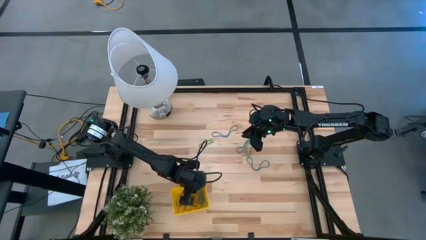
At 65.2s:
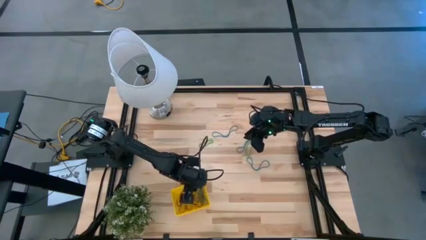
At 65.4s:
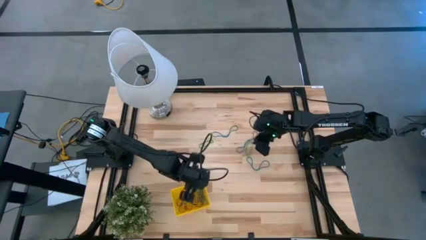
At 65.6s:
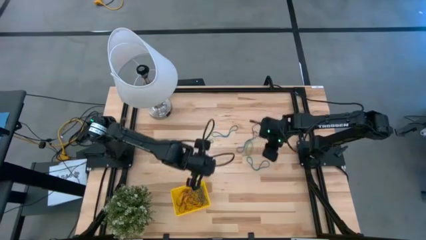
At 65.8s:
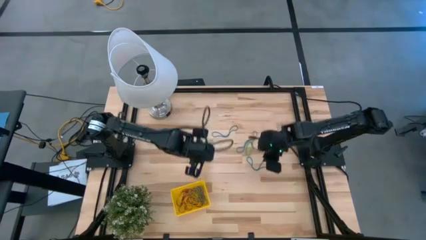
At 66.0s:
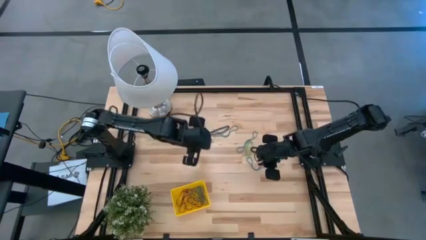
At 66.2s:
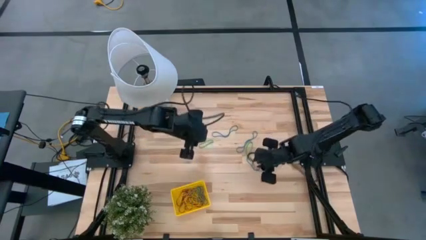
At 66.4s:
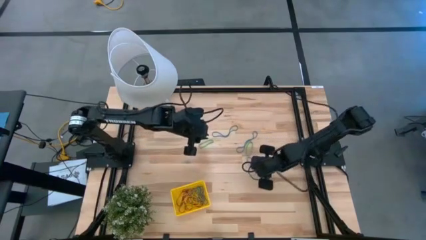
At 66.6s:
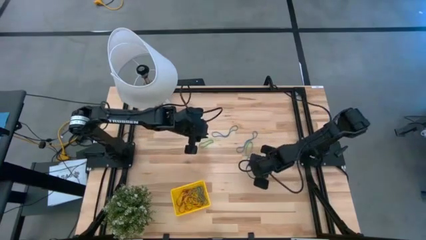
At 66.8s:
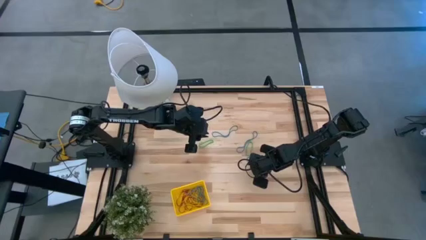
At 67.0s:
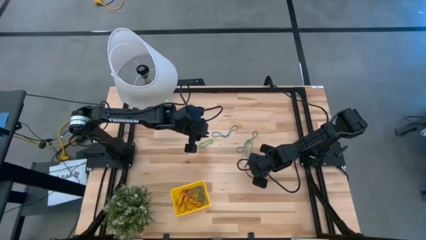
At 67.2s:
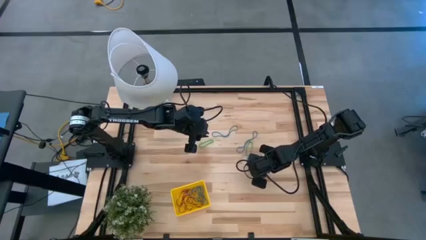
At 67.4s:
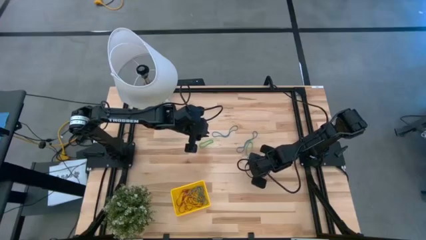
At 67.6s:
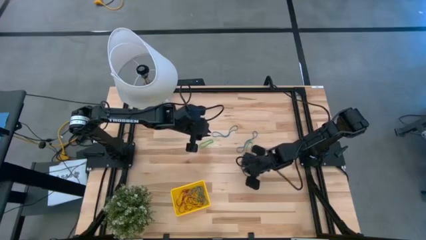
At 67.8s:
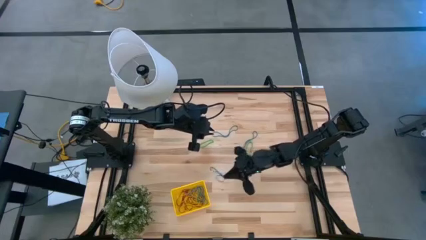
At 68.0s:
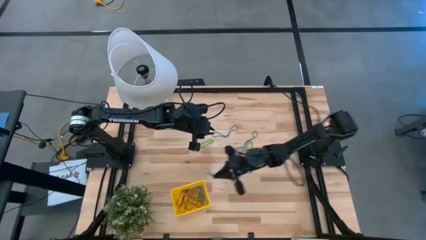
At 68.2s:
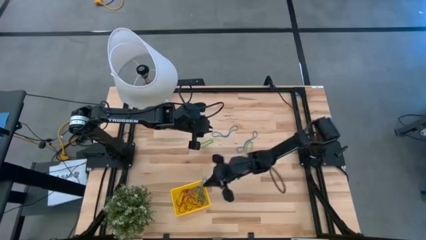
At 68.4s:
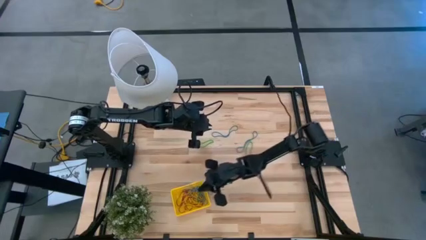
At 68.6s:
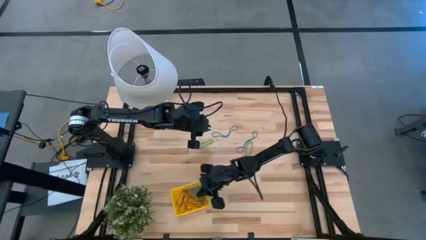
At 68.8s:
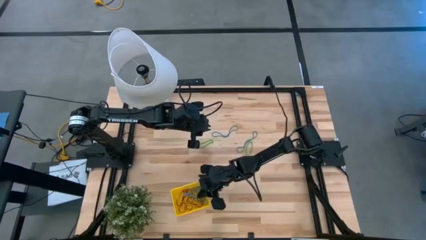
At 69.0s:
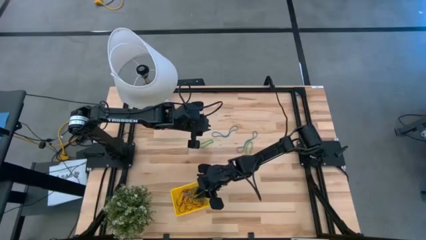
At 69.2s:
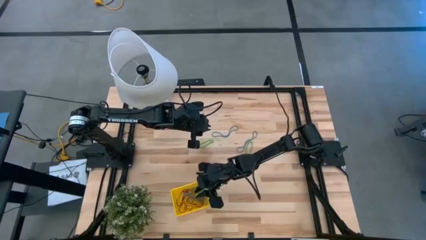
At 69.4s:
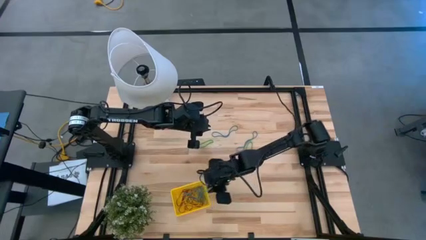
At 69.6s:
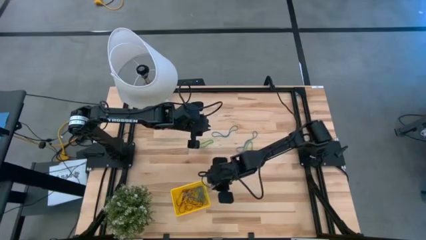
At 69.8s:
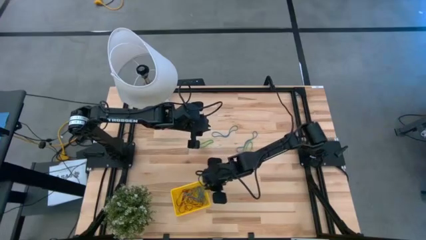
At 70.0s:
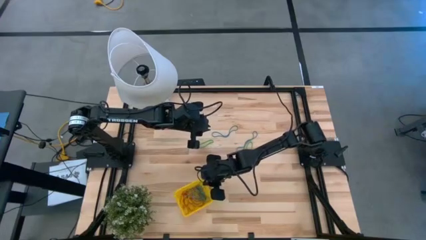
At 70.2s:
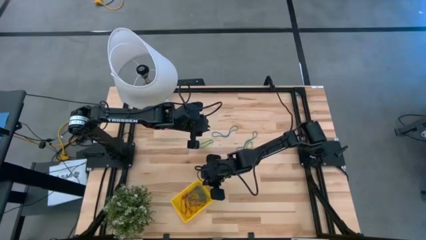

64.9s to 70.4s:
Task: Pick and place items into bin
Put the blue rubber band into the yellow bin

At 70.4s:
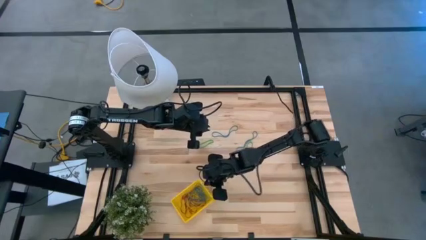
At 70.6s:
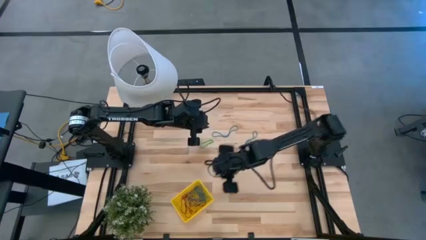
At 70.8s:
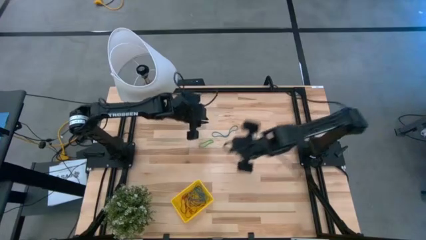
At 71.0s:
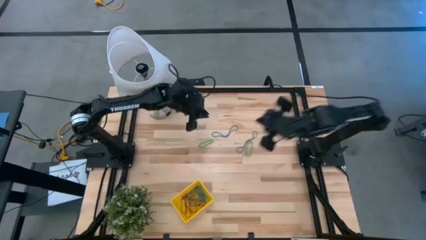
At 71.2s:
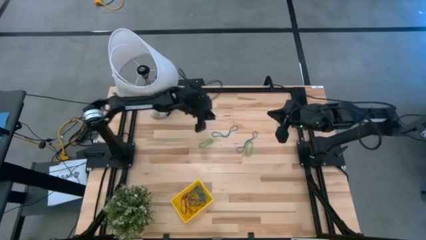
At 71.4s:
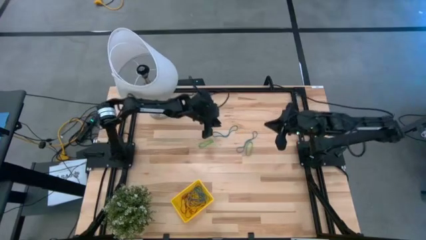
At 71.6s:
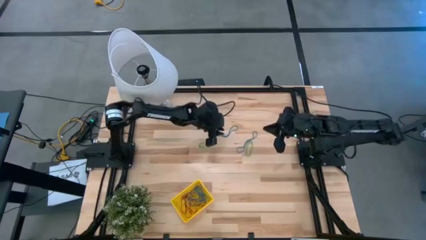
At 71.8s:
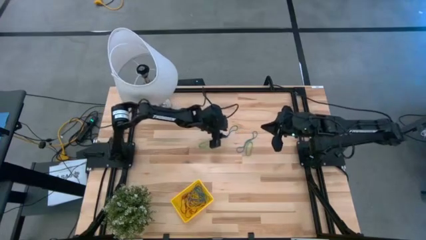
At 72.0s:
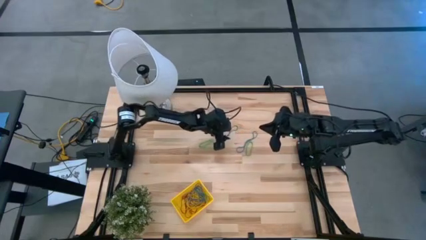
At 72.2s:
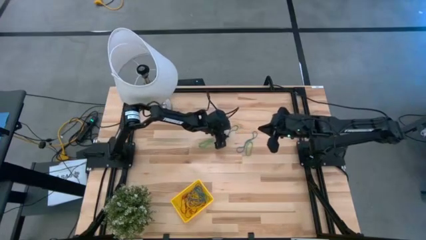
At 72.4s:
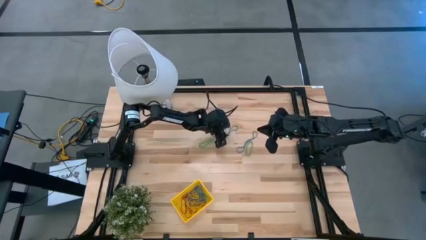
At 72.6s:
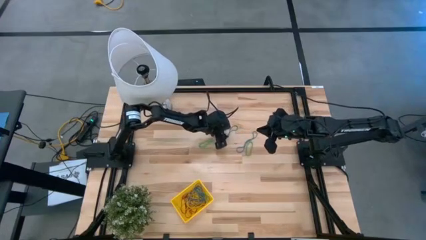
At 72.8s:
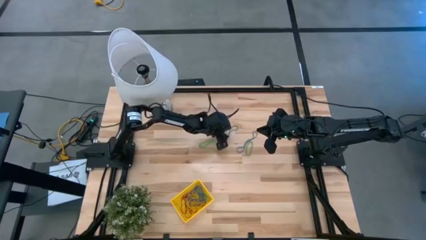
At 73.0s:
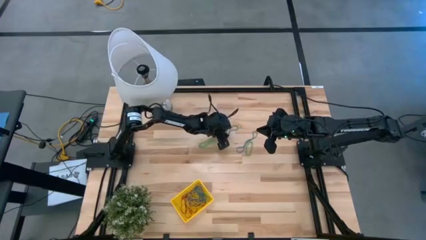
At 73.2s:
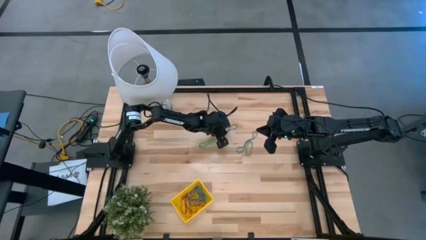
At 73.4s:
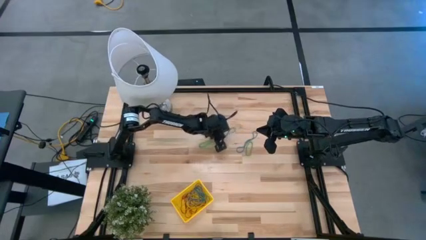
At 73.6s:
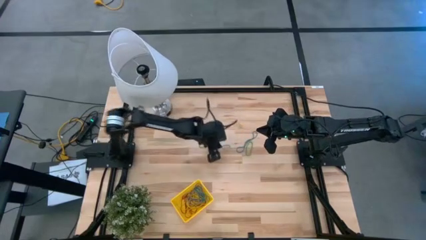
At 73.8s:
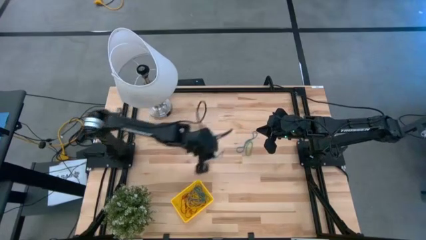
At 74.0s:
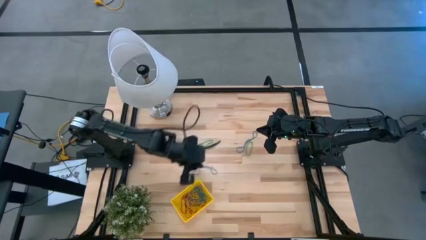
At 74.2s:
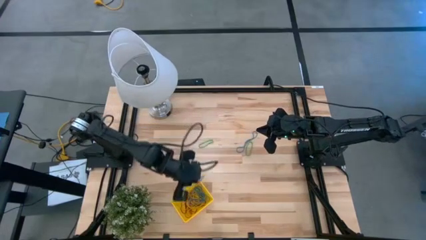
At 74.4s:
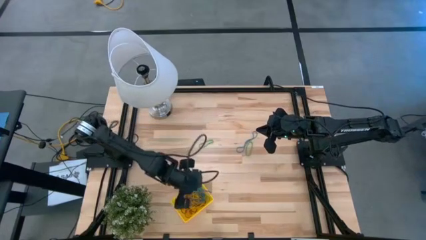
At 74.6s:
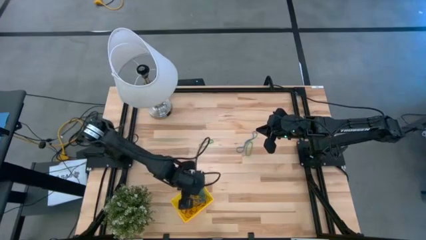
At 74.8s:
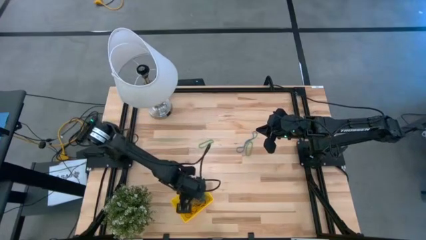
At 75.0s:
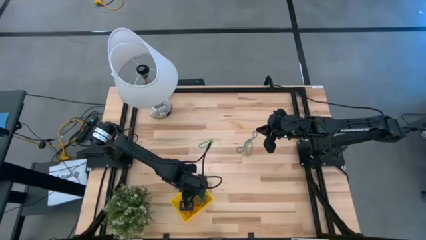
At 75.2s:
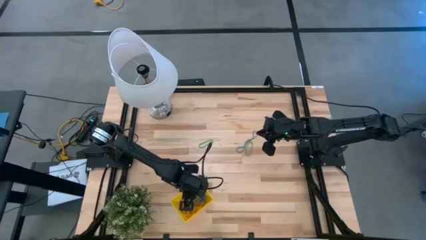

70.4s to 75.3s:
Put the blue rubber band into the yellow bin

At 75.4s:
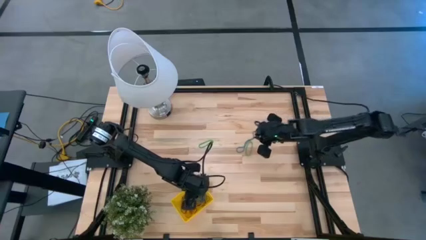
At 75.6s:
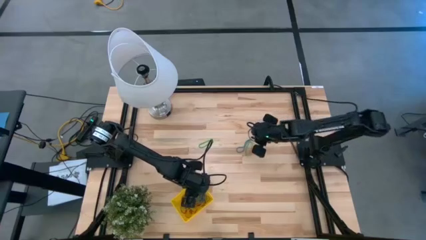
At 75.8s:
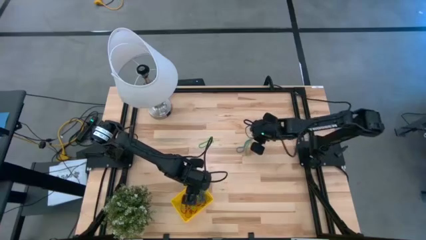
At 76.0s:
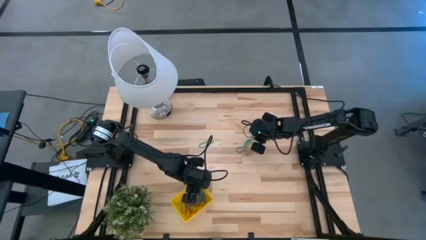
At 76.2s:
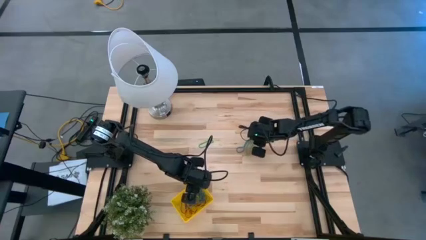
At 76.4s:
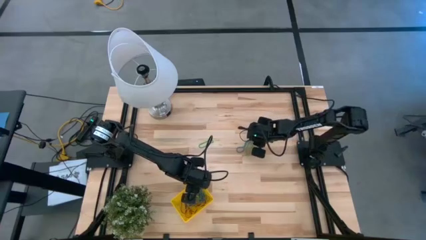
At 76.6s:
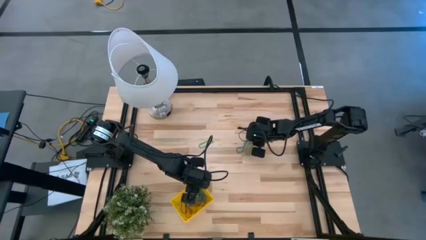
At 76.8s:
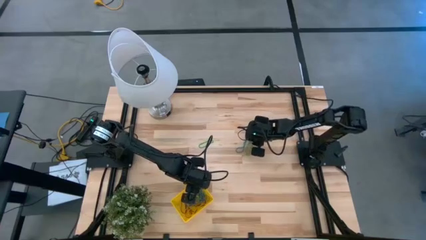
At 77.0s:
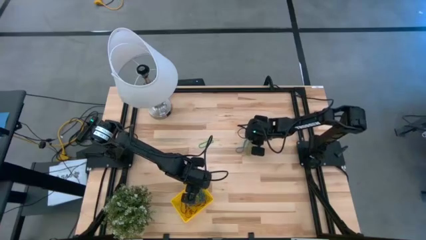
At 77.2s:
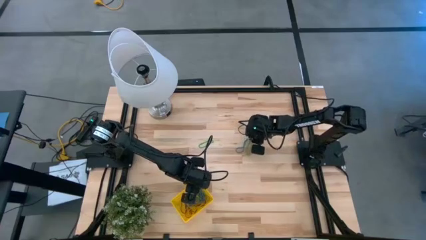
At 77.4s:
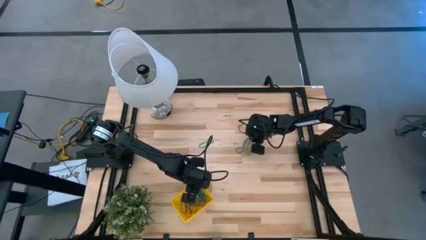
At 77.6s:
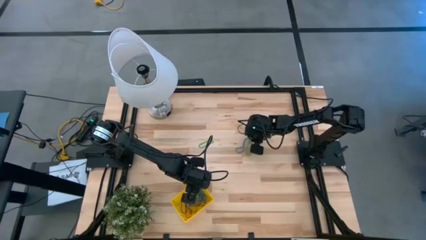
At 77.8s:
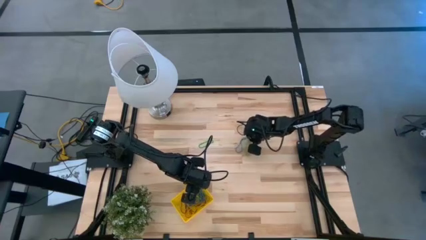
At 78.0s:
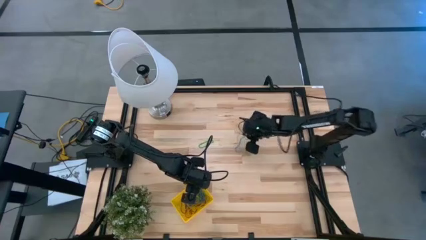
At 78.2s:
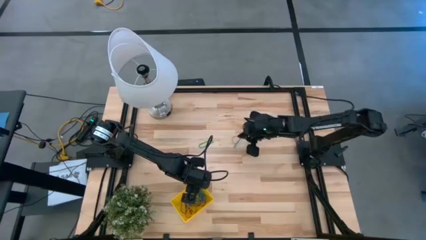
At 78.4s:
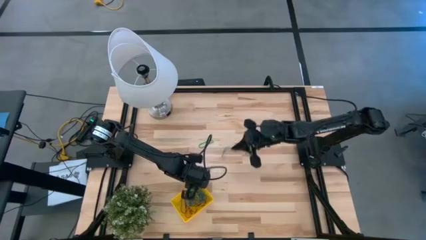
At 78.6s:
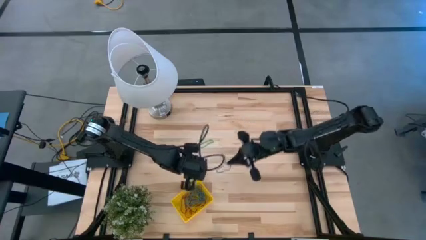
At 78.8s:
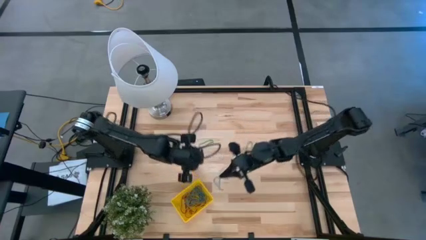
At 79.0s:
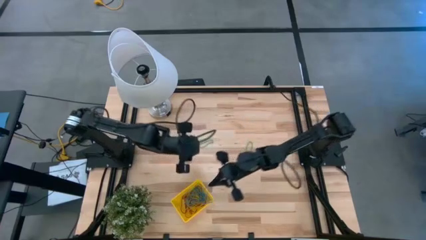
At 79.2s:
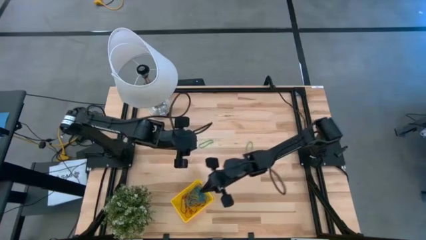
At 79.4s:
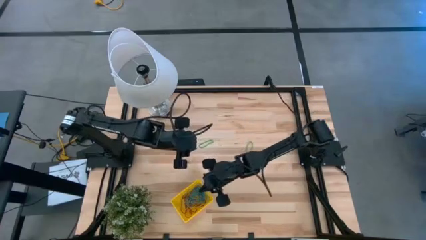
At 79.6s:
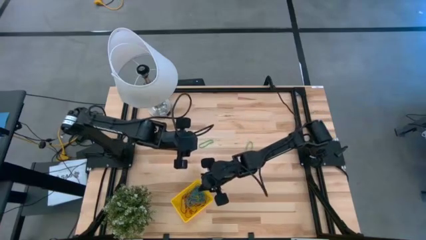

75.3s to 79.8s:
Put the blue rubber band into the yellow bin

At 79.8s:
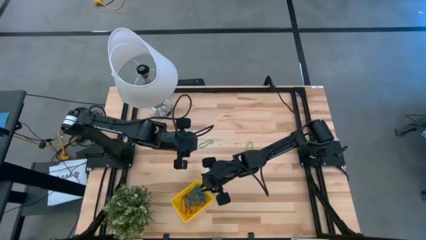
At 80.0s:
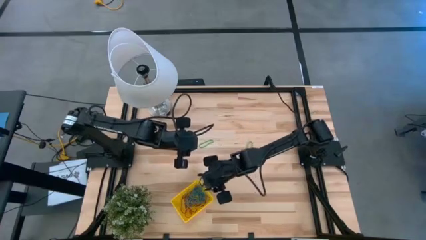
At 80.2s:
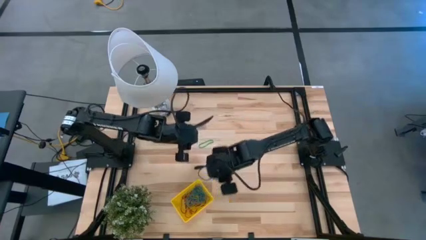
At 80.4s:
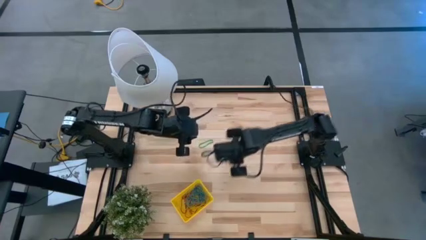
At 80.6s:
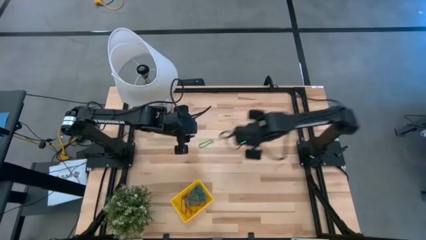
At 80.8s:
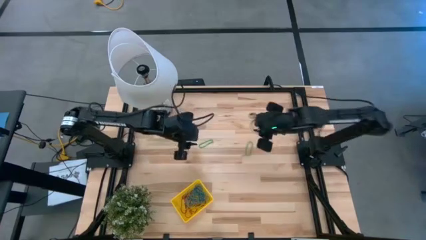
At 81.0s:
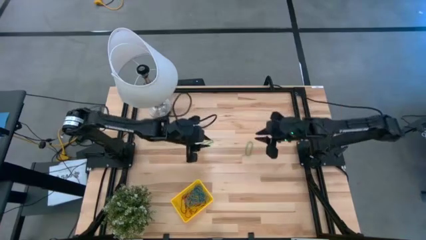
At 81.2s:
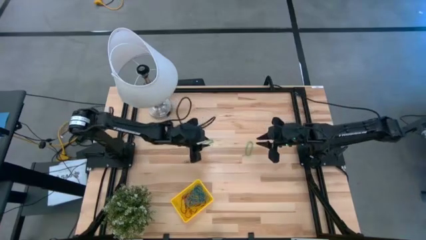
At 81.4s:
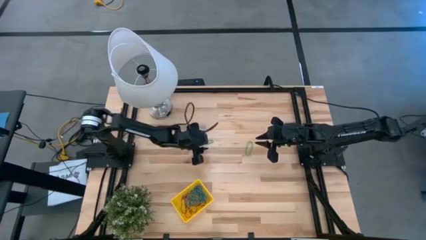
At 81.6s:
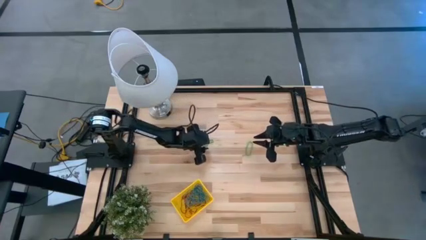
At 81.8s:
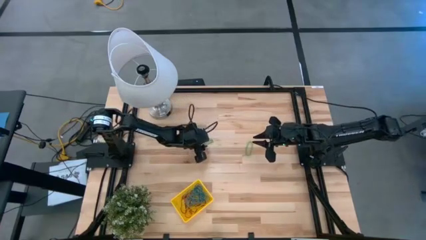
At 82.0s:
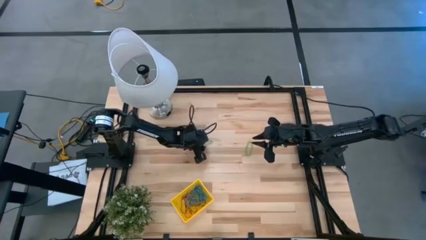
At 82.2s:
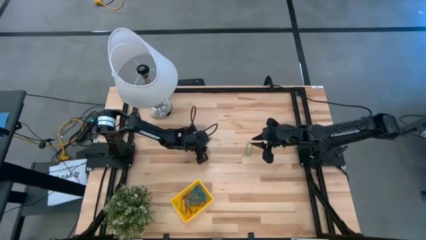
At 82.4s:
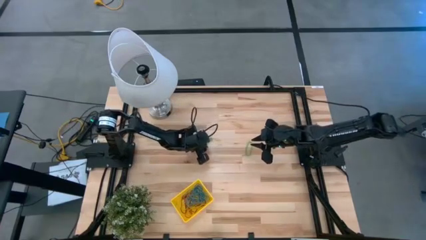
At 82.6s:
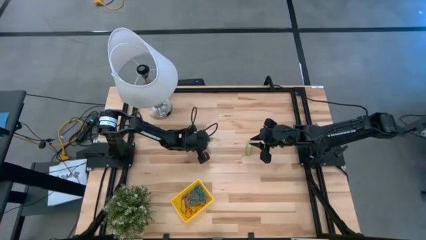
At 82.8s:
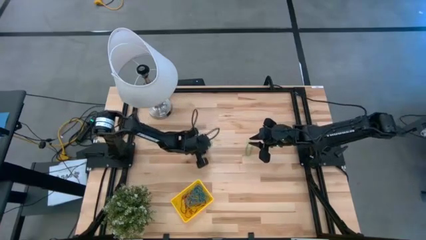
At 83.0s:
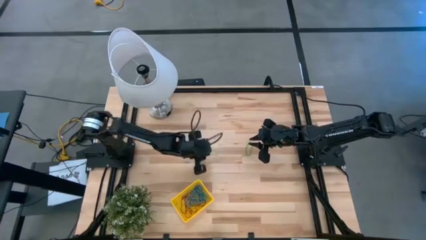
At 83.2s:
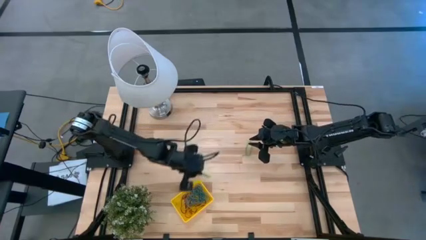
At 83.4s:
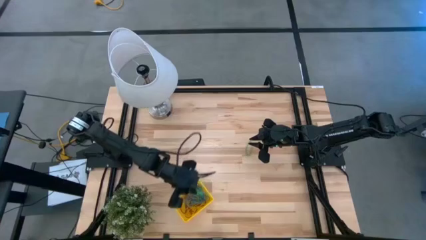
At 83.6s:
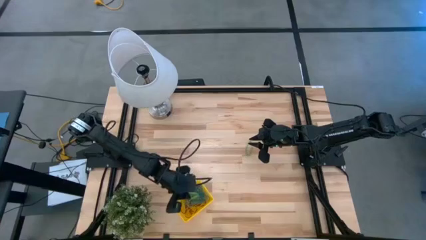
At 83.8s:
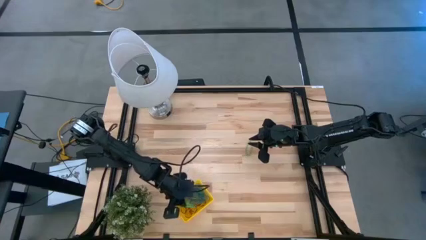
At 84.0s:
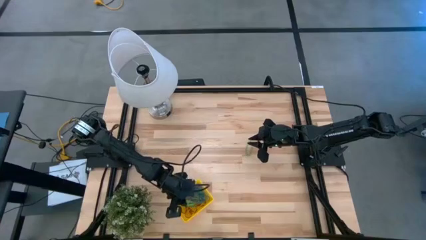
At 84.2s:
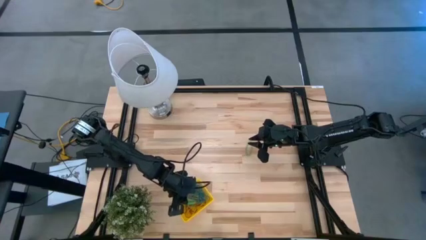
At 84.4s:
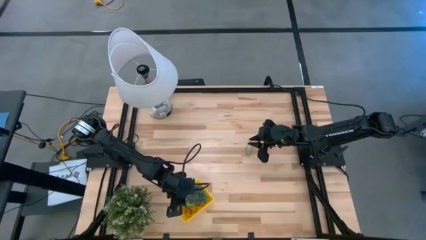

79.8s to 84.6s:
Put the green rubber band into the yellow bin
